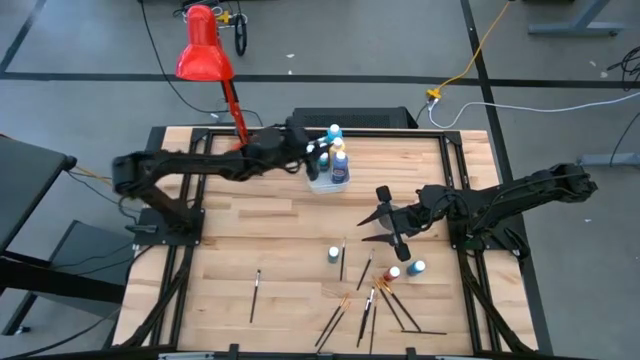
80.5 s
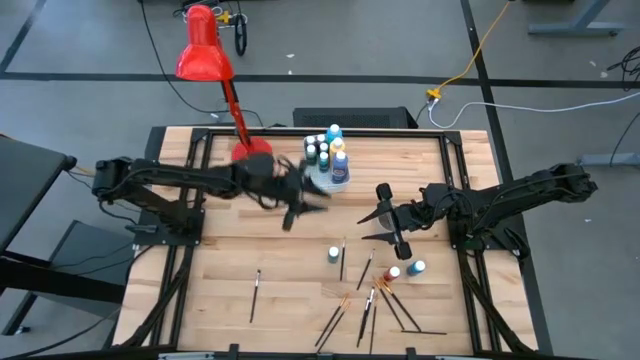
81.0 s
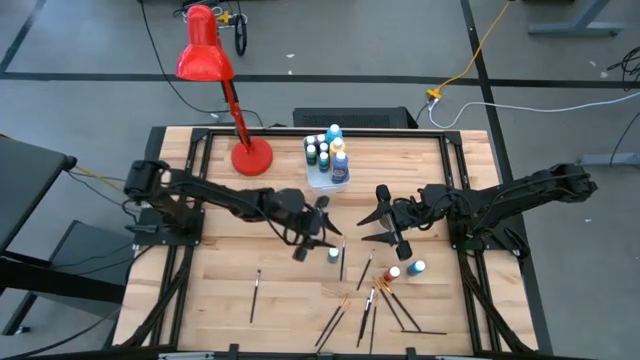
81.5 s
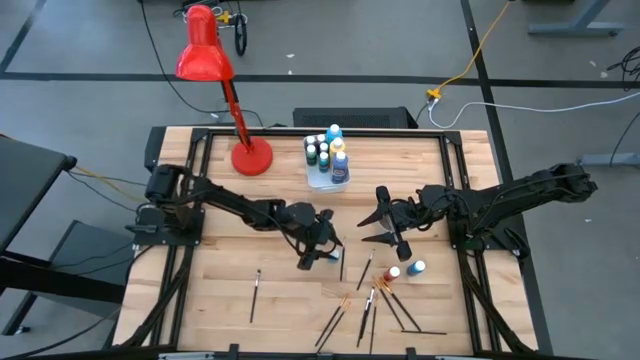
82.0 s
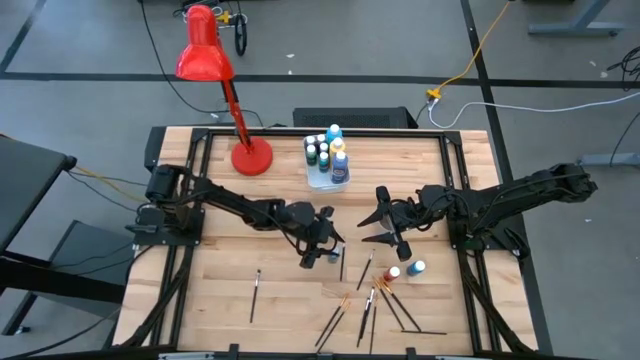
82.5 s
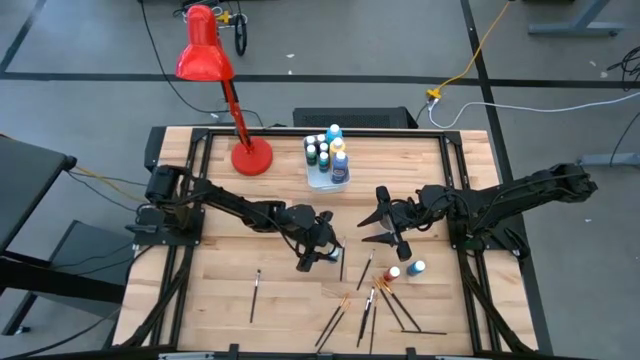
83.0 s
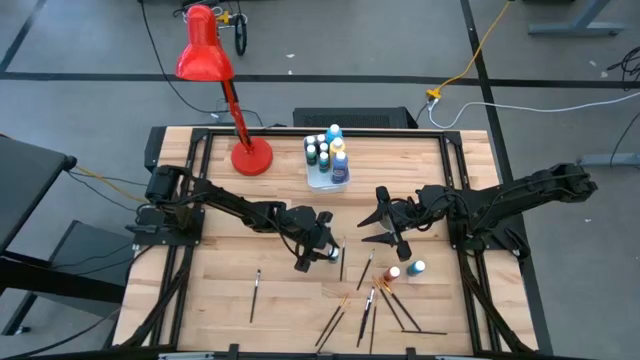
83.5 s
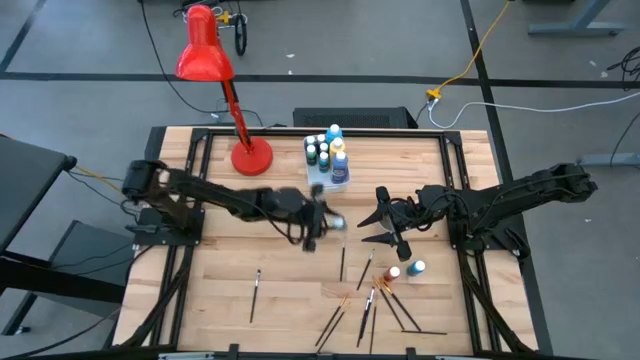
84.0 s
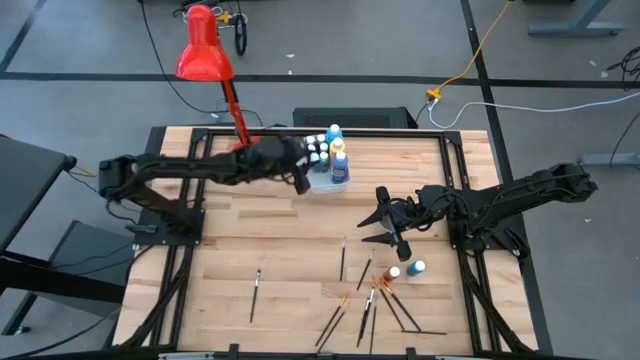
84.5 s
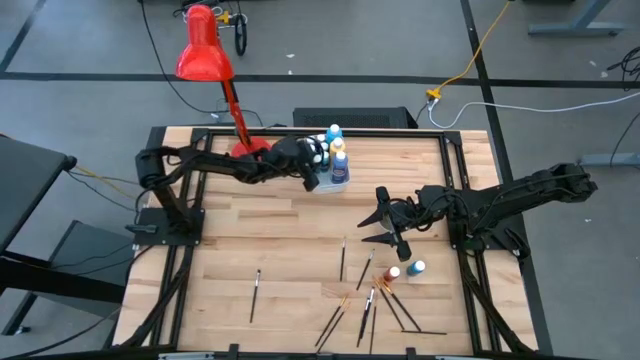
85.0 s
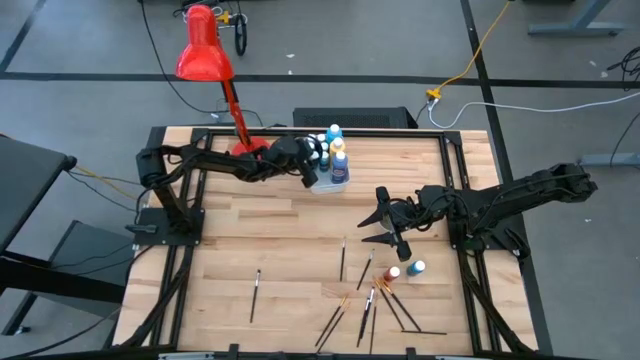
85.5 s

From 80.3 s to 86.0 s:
Task: Pick & Place Paint Supplies
Put the small light green paint bottle into the white bin

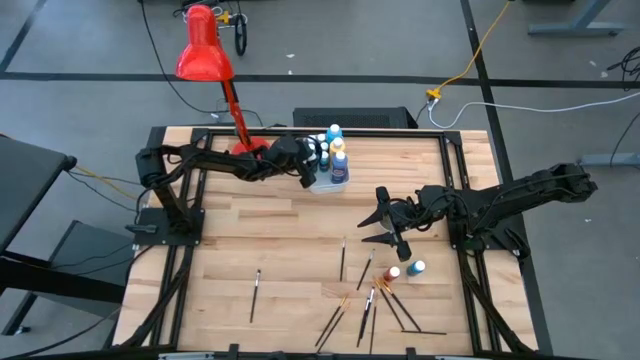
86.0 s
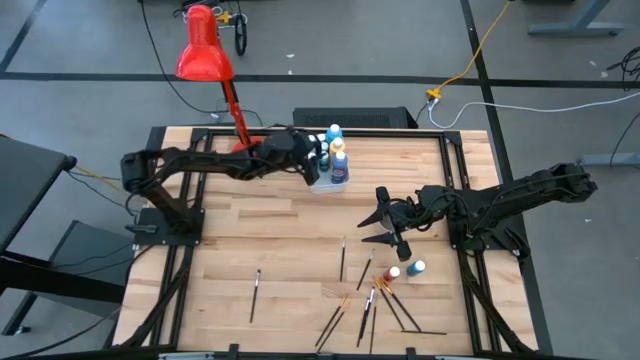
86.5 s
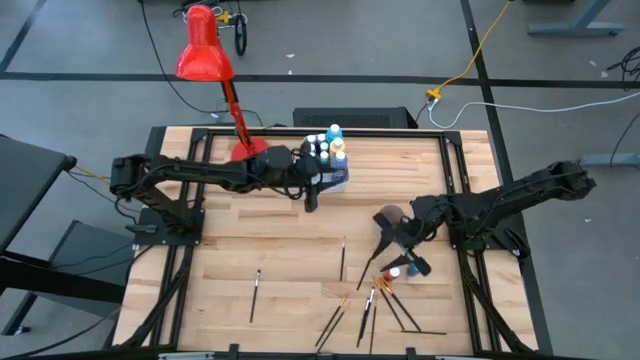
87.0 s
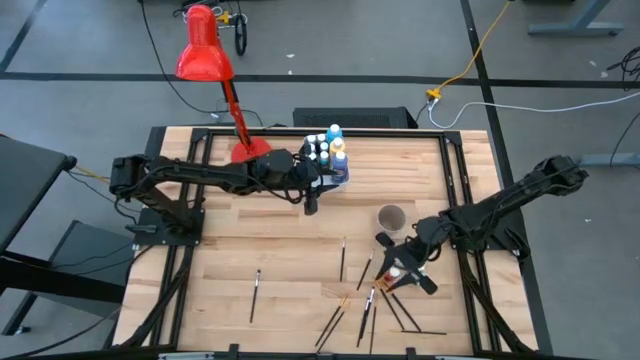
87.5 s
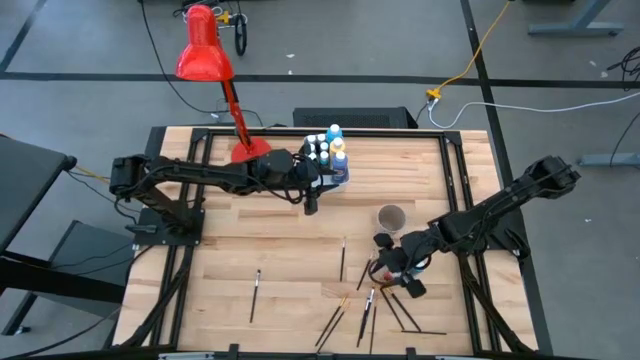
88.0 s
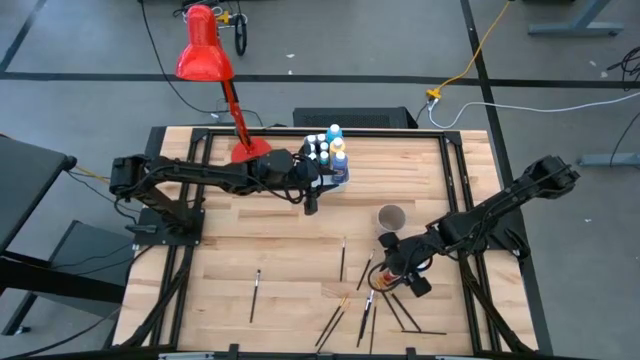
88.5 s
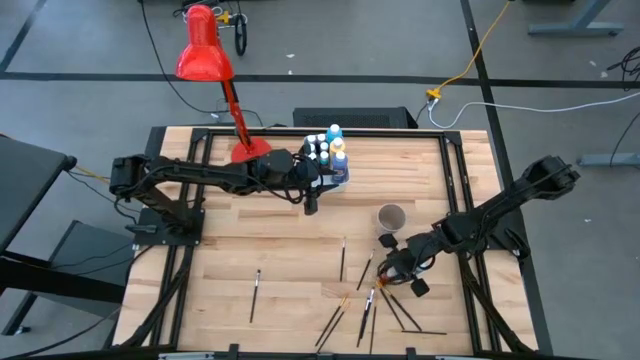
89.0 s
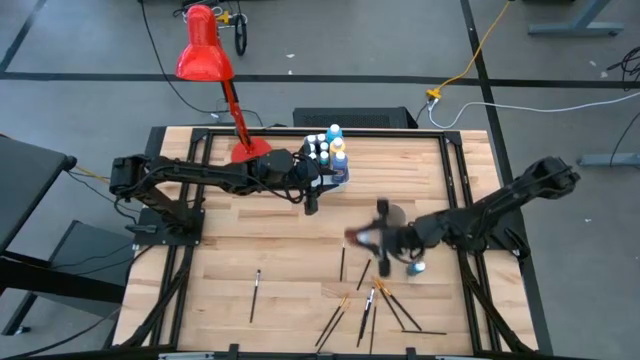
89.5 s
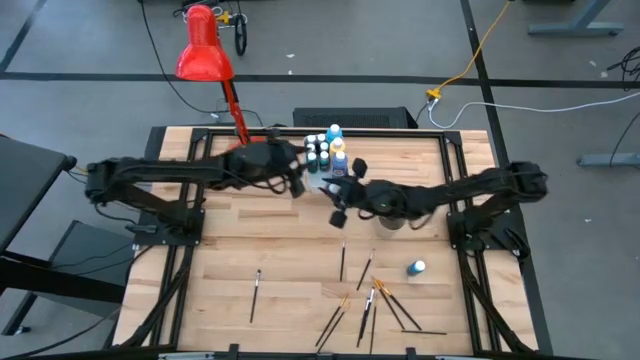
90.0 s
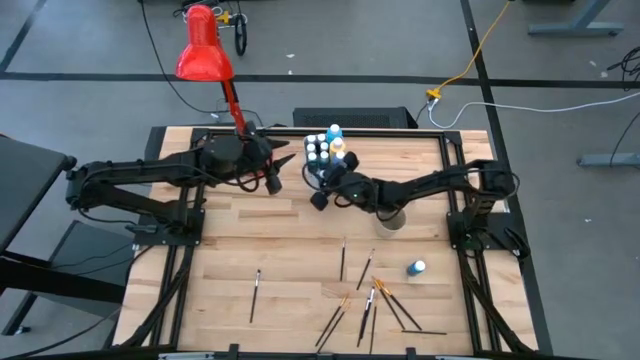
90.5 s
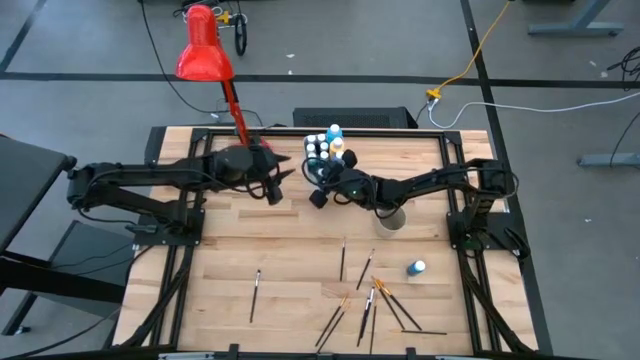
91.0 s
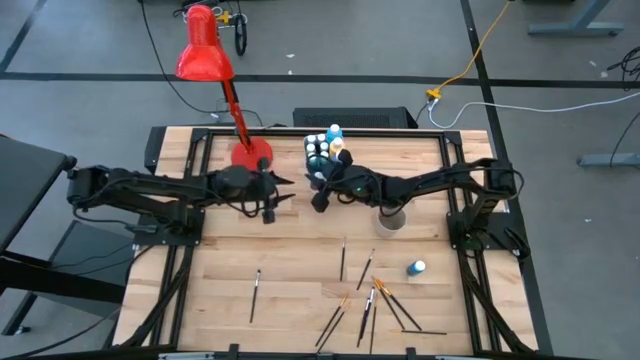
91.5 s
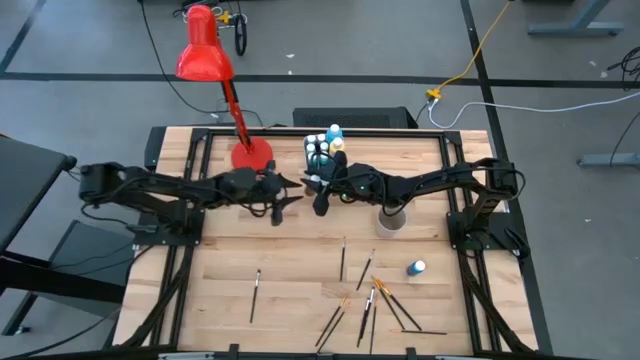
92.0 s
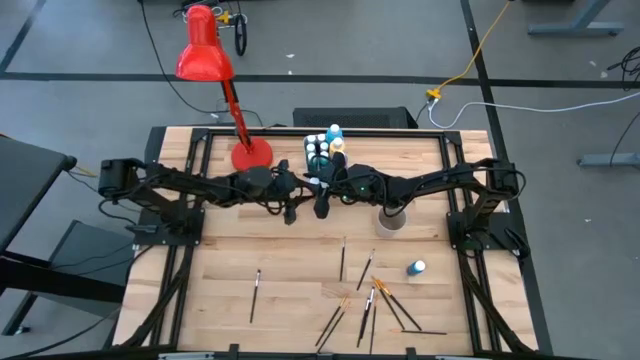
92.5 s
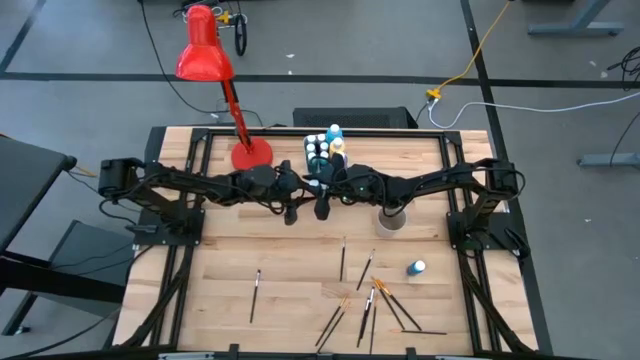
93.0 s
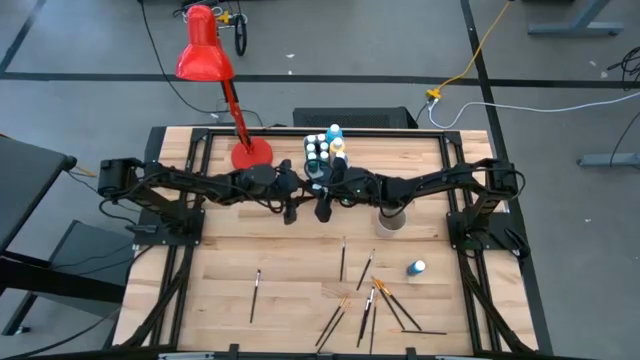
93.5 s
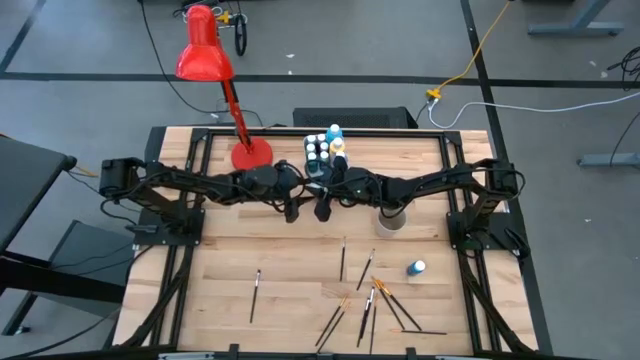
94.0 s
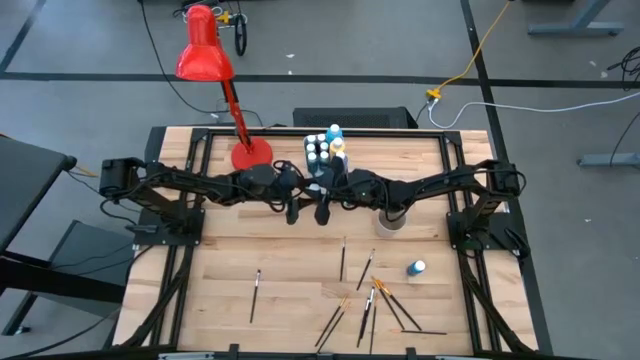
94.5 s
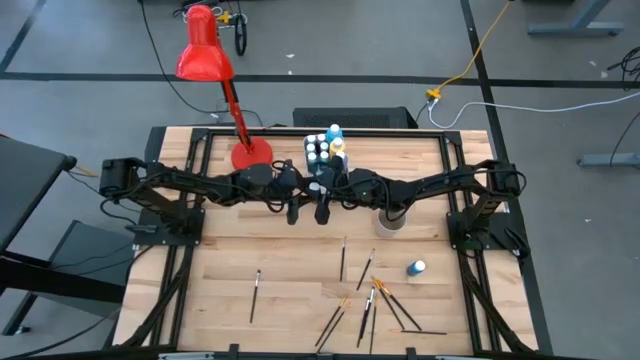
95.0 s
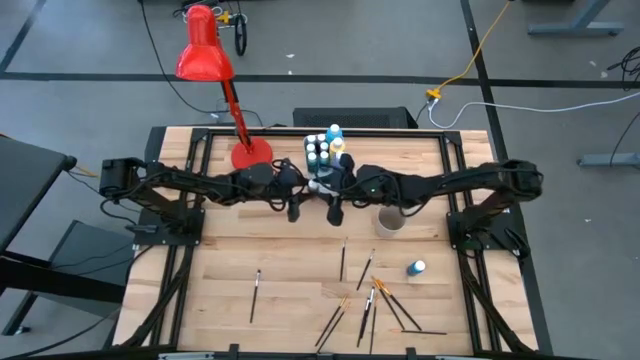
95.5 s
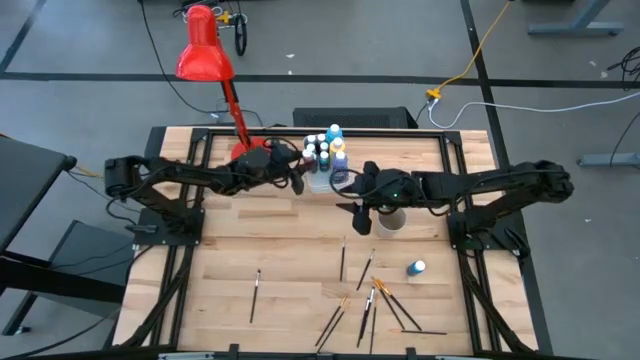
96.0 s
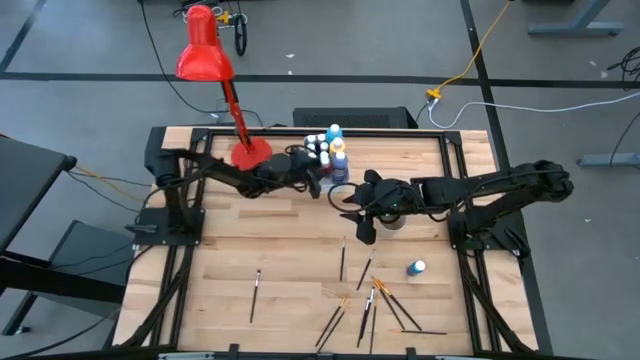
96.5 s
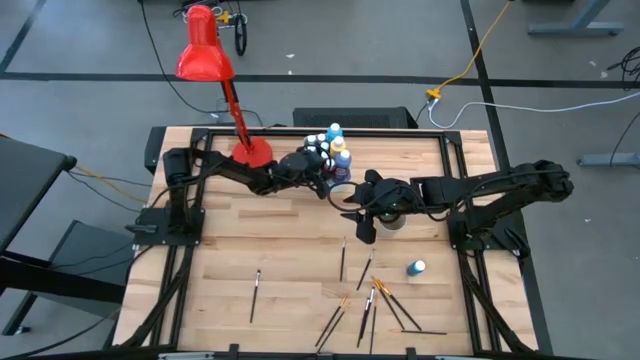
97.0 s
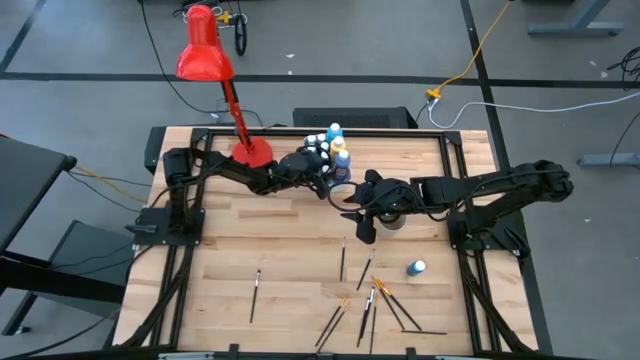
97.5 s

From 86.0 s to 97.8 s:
Put the small red paint bottle into the white bin

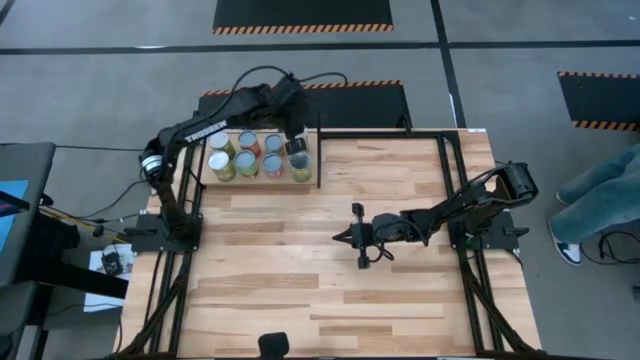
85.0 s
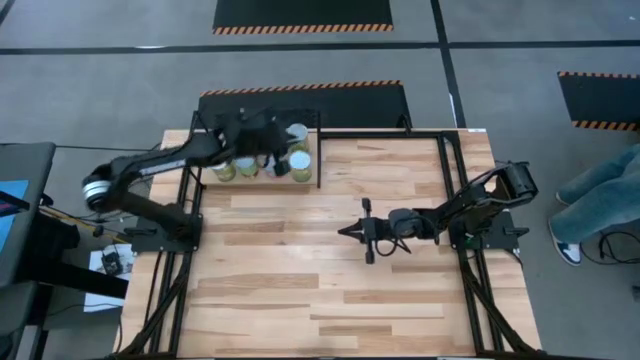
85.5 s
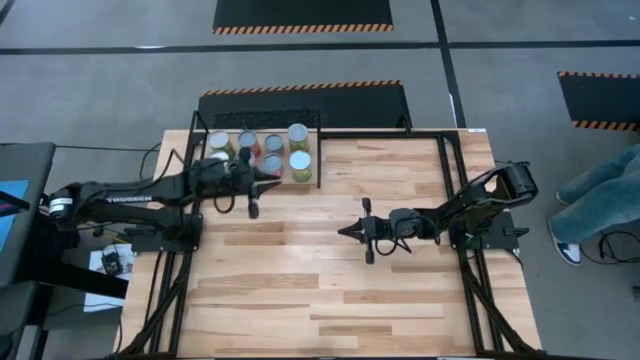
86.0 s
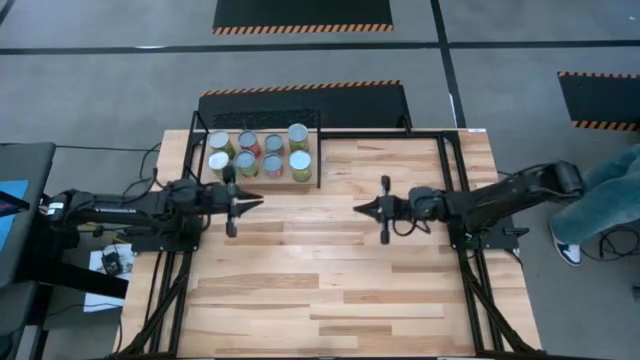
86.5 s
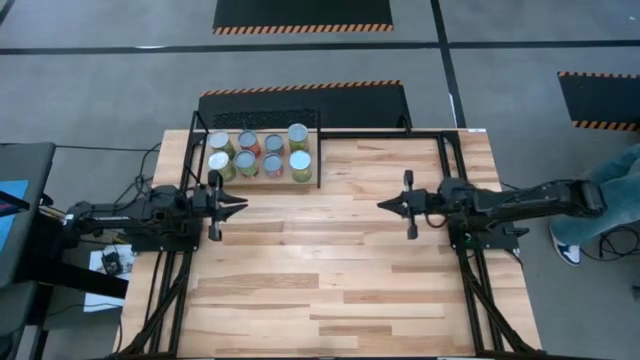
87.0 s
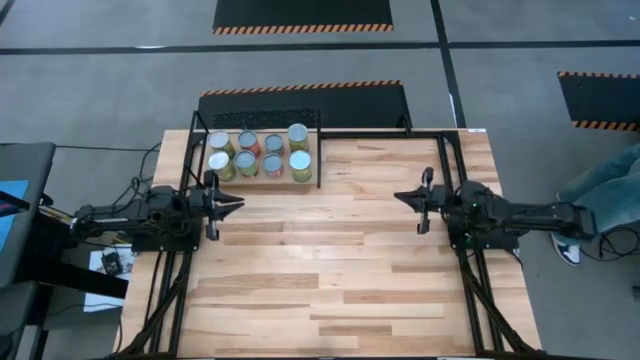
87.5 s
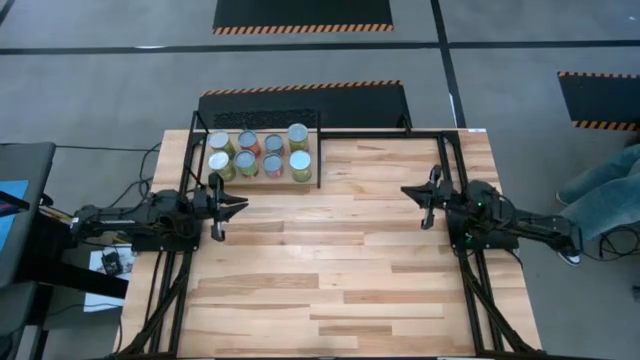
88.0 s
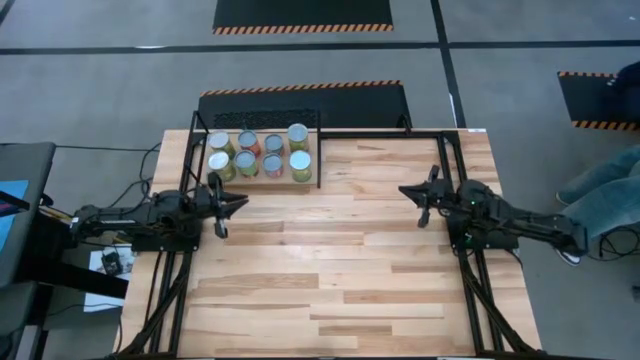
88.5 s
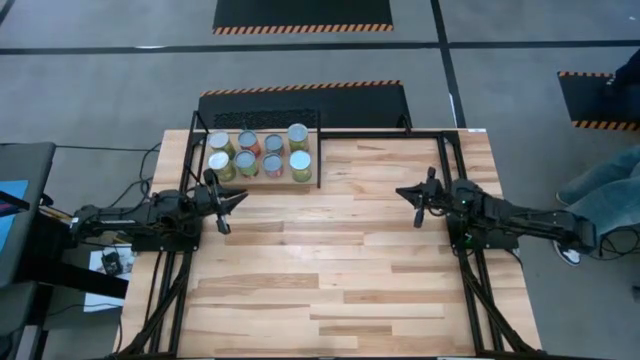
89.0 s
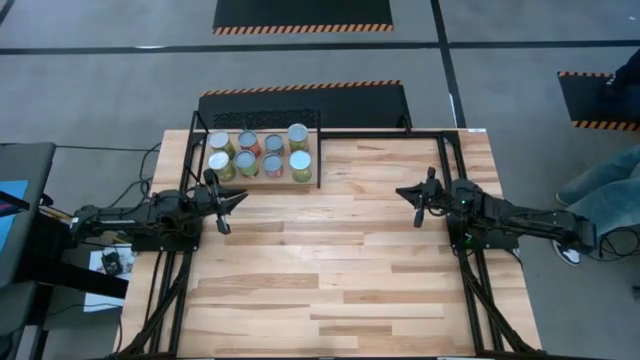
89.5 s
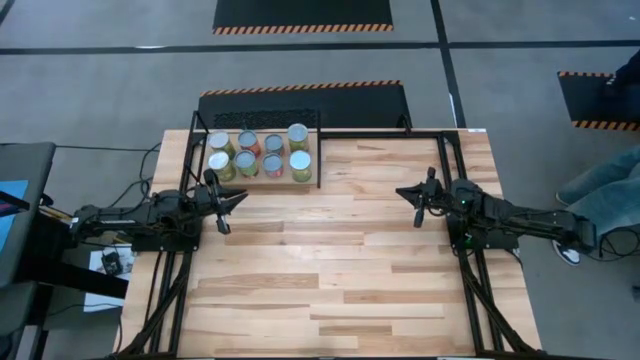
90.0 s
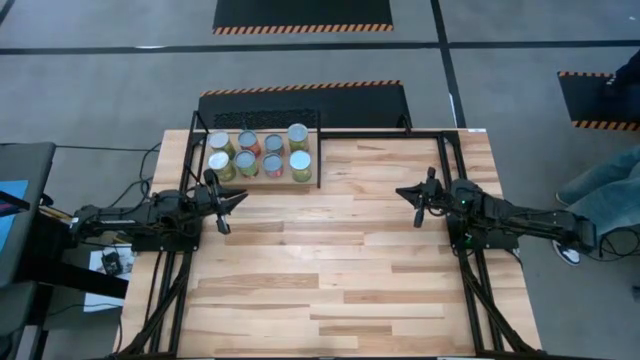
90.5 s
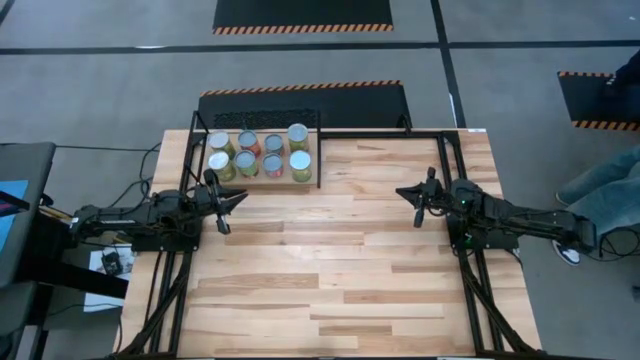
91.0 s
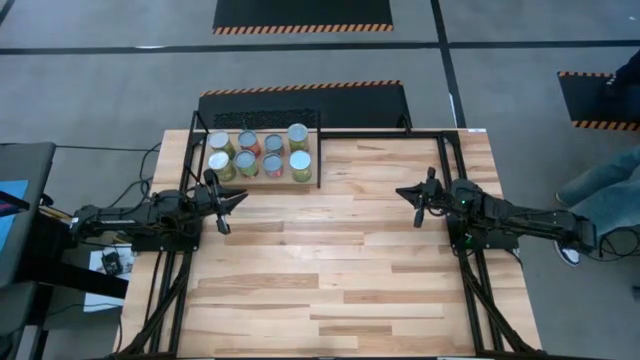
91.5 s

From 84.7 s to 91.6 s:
Task: Pick and place cans onto a shelf
Return to Home Position
